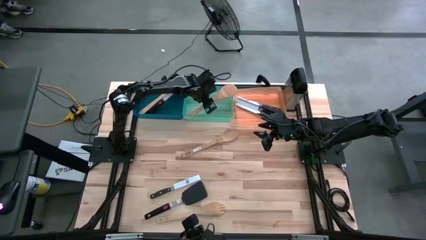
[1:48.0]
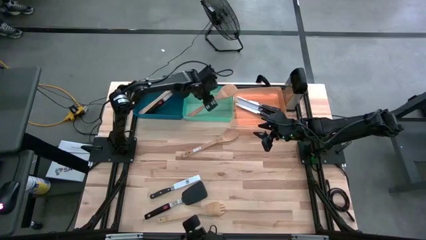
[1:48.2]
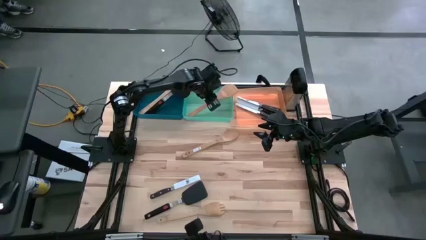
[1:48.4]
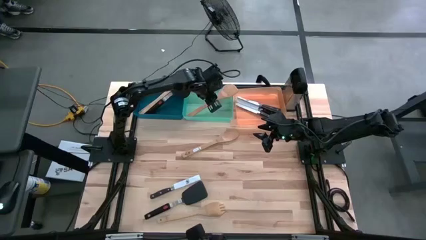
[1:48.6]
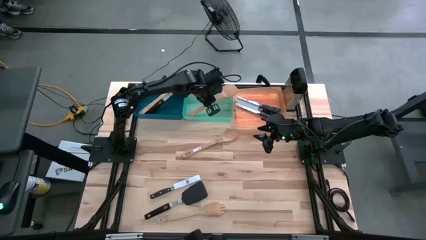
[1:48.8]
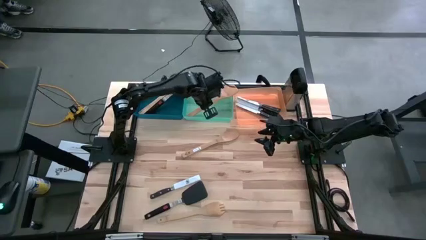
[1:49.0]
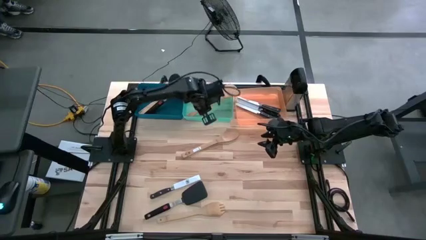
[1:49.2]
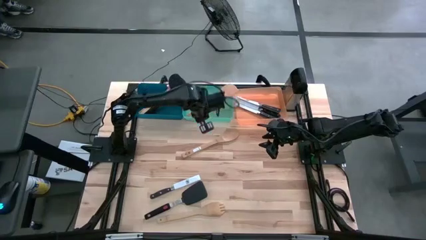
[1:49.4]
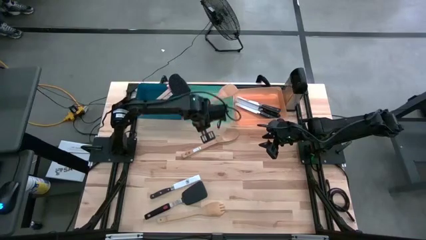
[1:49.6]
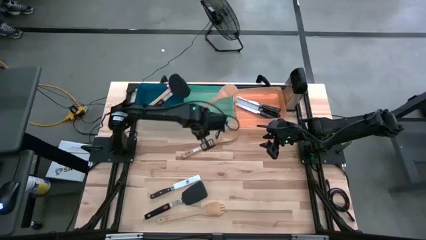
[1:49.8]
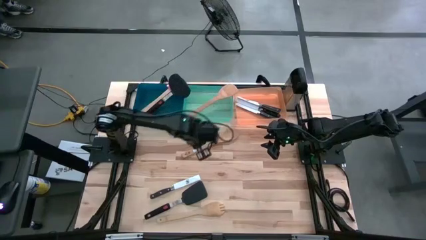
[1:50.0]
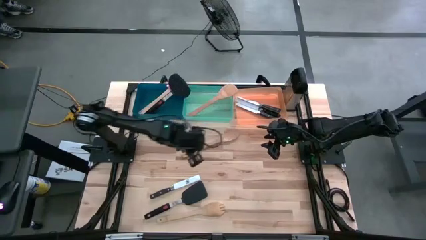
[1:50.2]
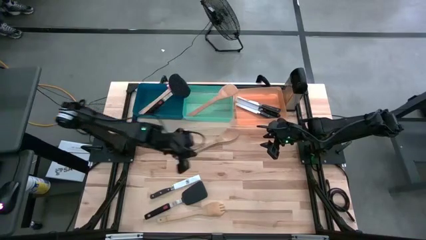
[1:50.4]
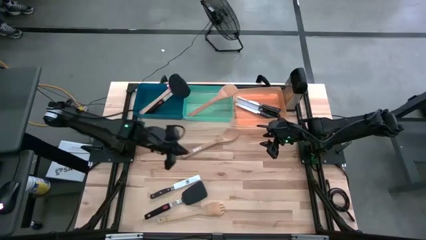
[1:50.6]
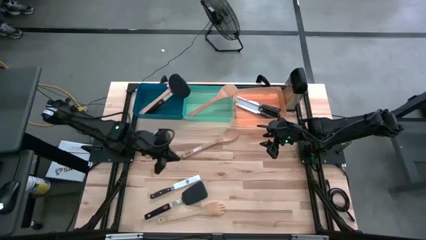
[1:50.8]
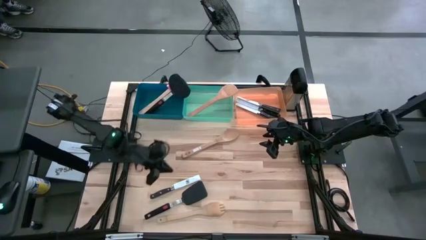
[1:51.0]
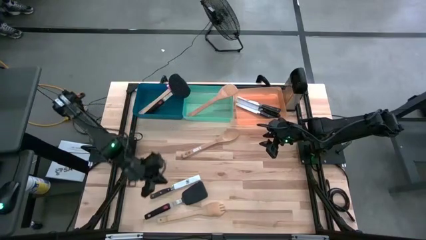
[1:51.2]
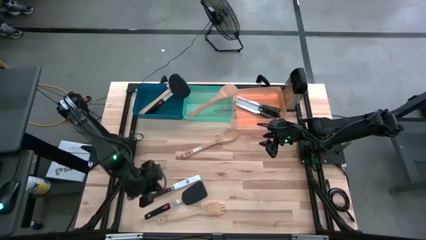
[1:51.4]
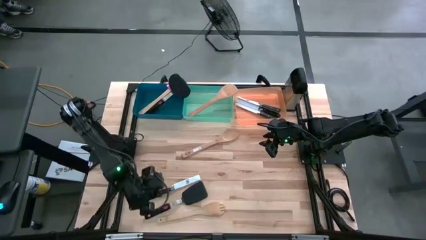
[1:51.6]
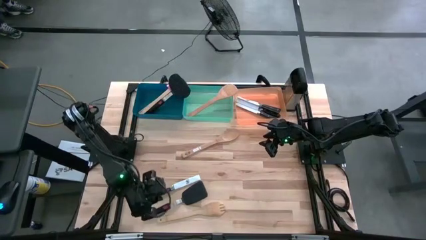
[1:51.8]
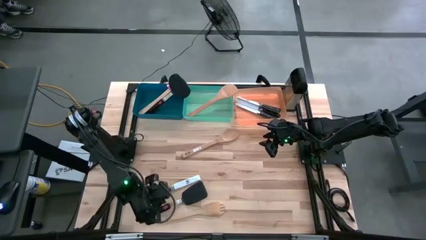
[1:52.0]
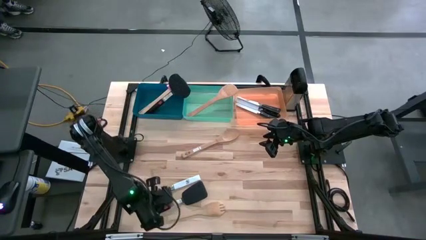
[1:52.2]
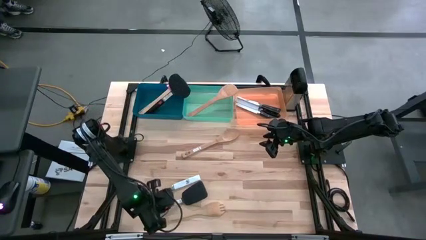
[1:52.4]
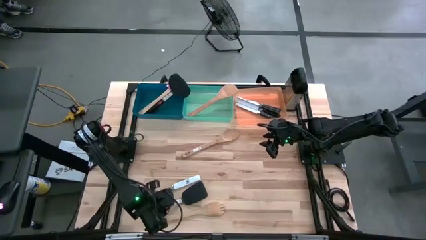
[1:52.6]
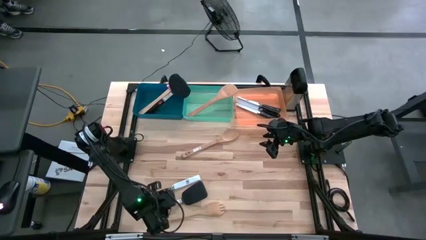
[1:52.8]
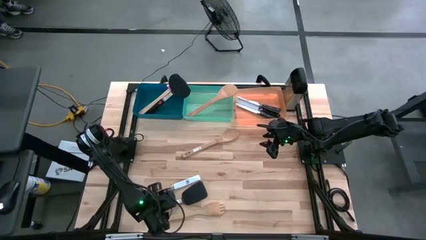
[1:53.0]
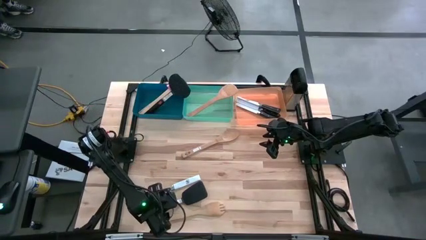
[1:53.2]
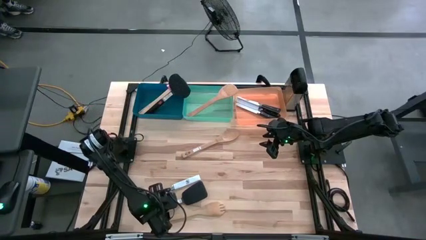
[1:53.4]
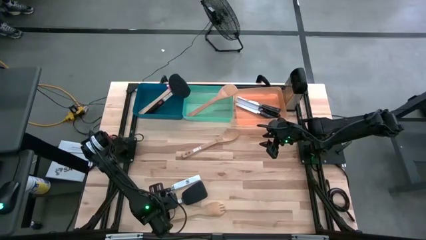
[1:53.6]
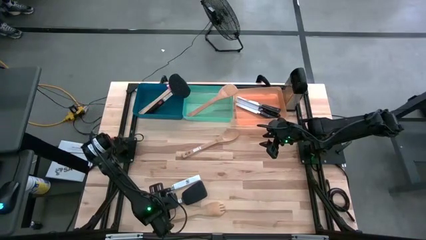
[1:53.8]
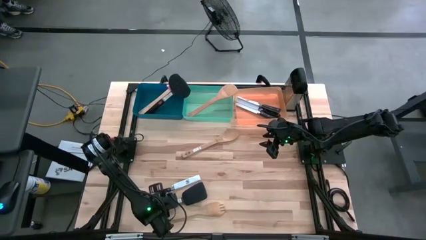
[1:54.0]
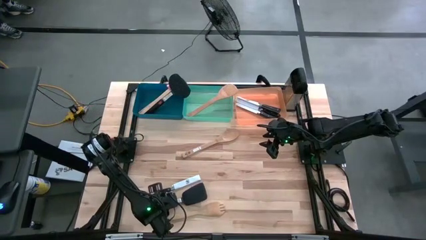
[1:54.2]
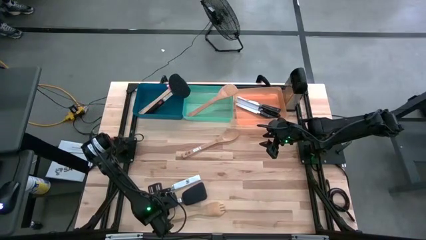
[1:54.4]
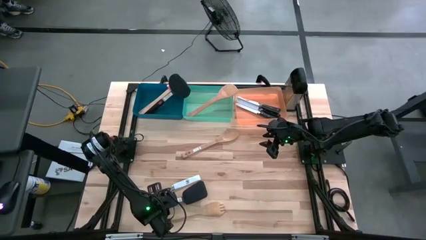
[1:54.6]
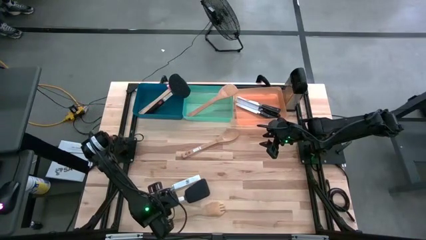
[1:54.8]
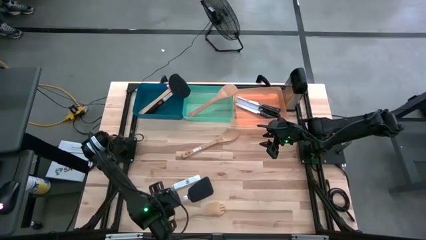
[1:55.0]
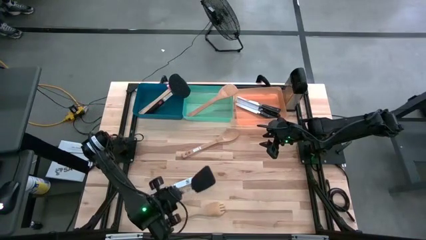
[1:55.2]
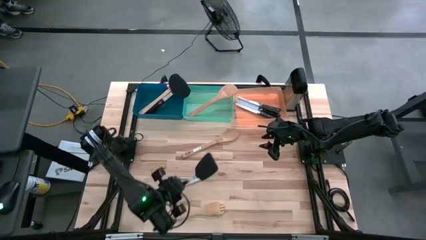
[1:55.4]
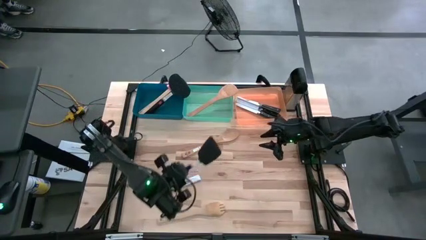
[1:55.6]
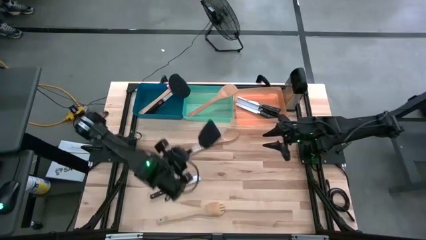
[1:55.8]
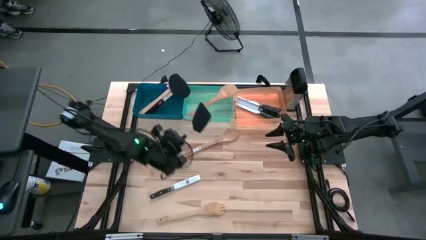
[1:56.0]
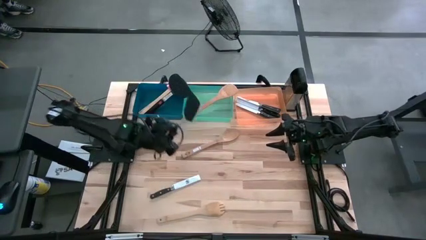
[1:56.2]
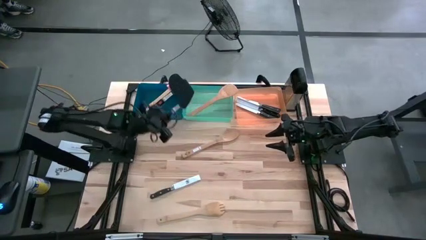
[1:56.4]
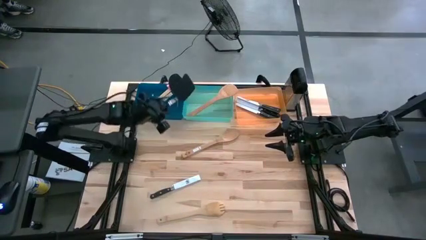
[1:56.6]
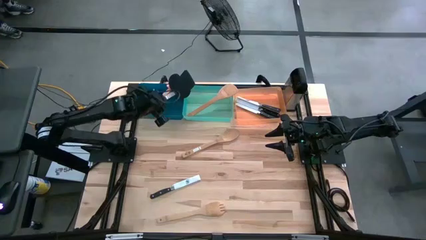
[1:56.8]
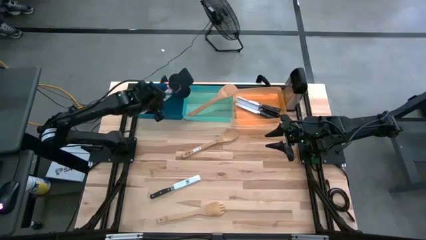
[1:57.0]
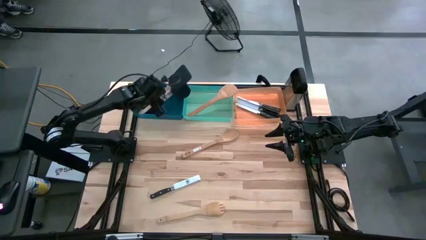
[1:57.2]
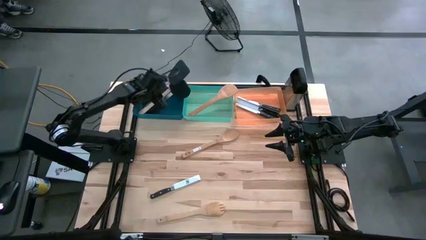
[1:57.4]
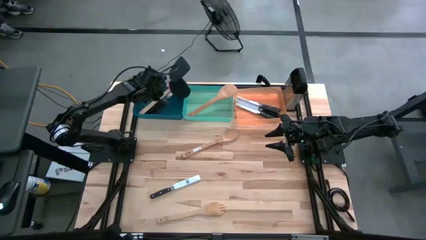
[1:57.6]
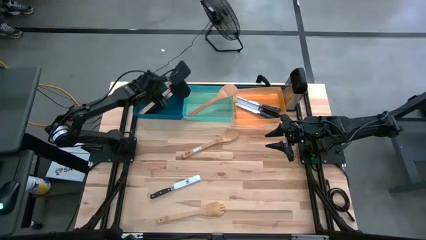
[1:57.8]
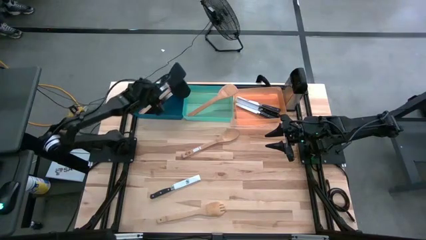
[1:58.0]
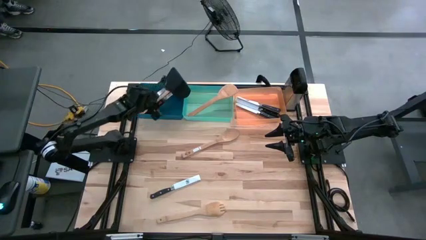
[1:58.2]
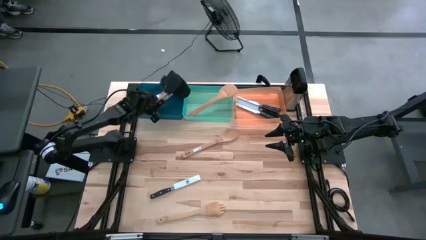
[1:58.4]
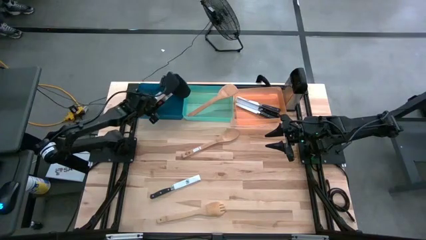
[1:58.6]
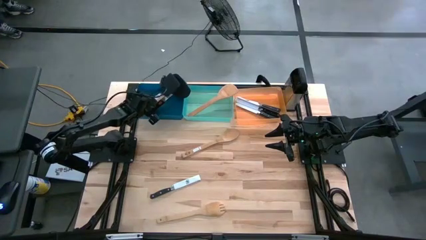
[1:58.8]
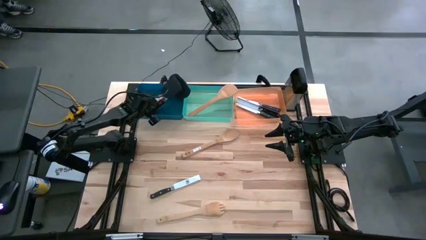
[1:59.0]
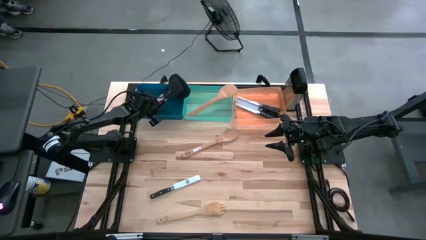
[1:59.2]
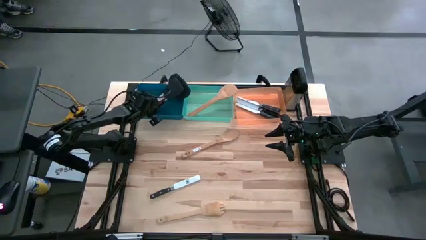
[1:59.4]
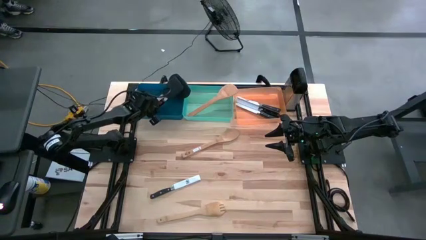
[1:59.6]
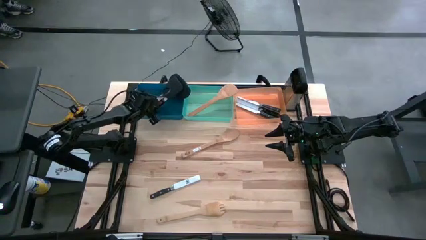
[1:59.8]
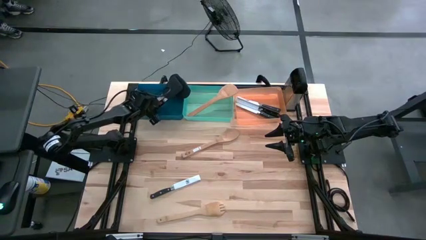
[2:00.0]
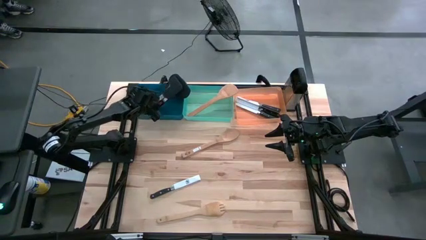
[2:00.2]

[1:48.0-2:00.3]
Task: Pick & Place Kitchen Items
Put the black spatula into the blue bin
